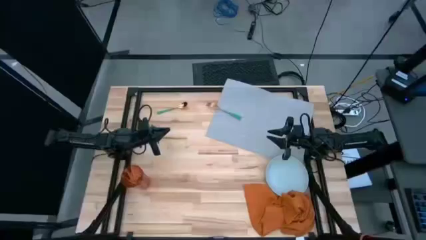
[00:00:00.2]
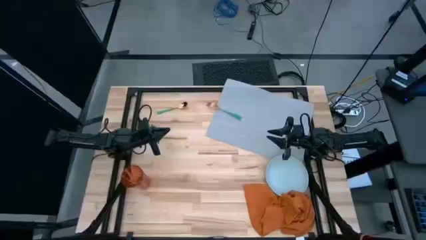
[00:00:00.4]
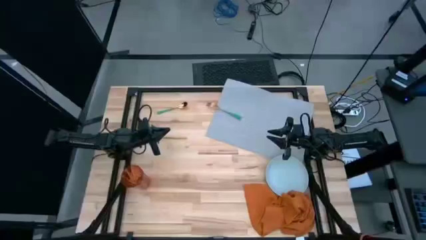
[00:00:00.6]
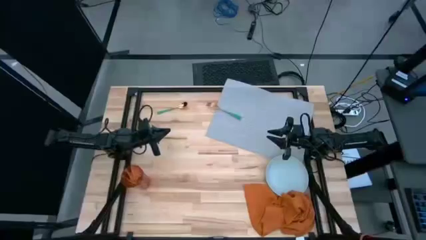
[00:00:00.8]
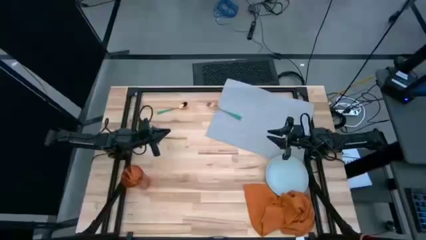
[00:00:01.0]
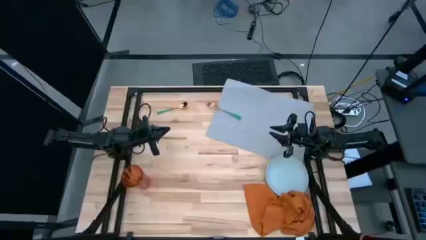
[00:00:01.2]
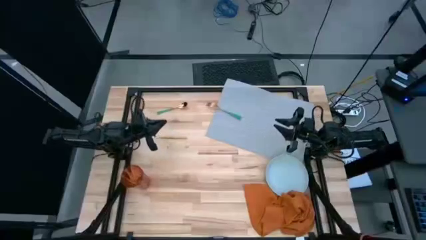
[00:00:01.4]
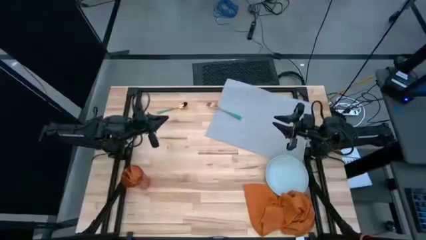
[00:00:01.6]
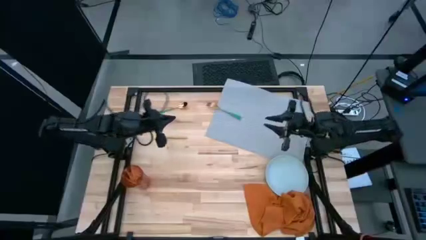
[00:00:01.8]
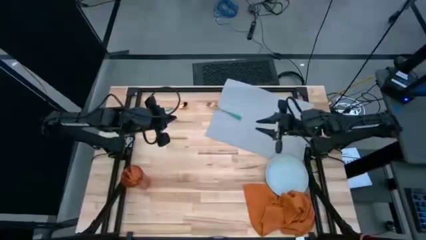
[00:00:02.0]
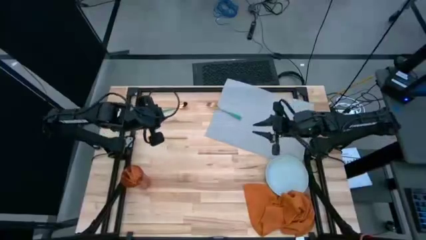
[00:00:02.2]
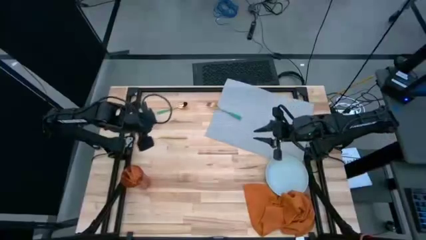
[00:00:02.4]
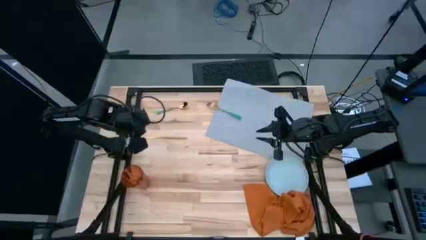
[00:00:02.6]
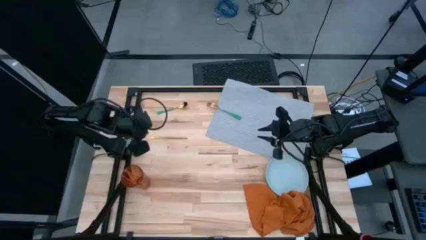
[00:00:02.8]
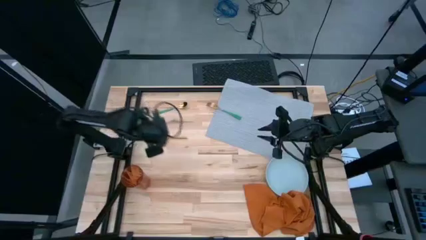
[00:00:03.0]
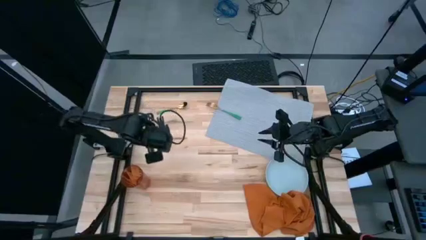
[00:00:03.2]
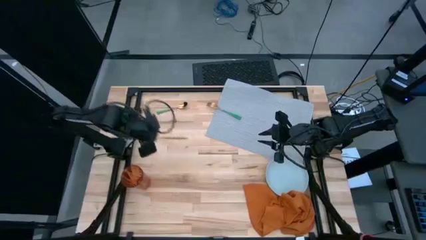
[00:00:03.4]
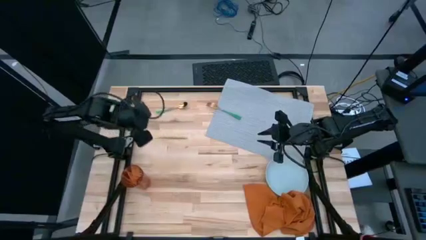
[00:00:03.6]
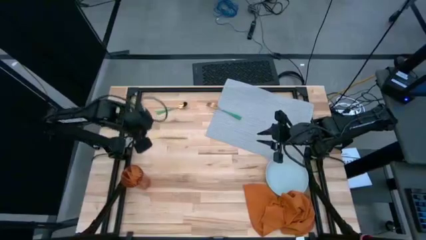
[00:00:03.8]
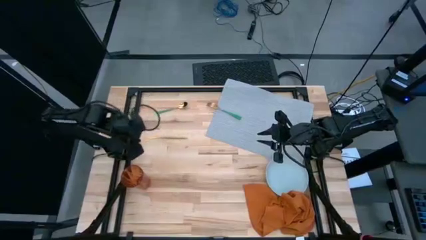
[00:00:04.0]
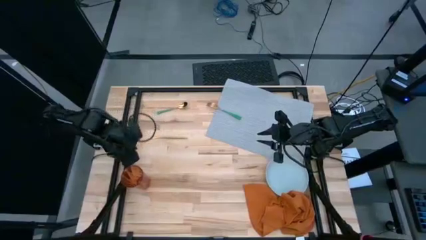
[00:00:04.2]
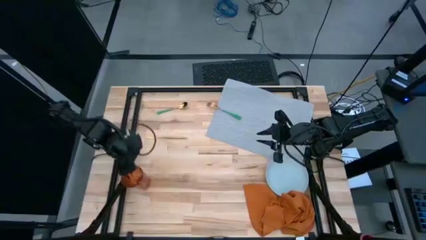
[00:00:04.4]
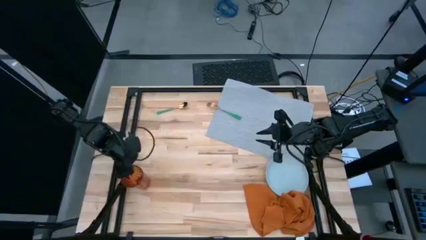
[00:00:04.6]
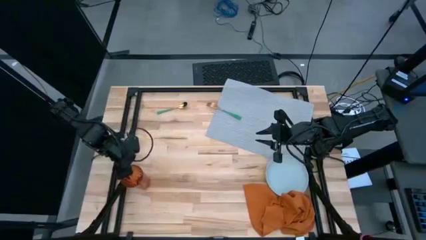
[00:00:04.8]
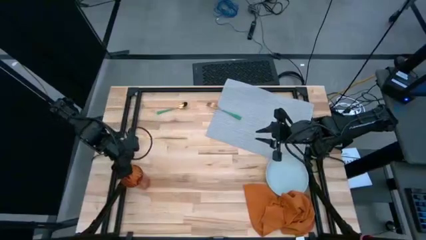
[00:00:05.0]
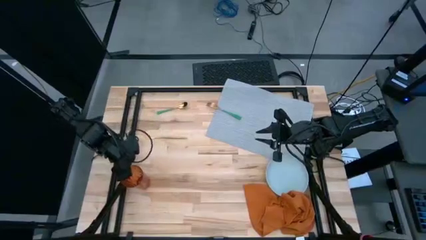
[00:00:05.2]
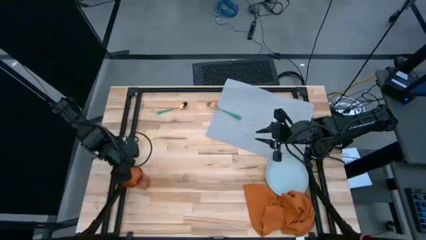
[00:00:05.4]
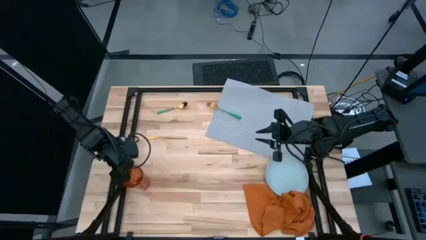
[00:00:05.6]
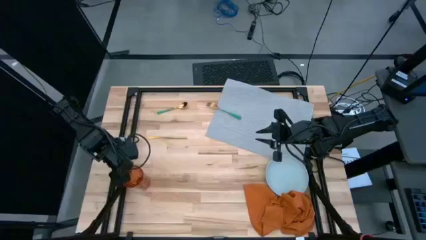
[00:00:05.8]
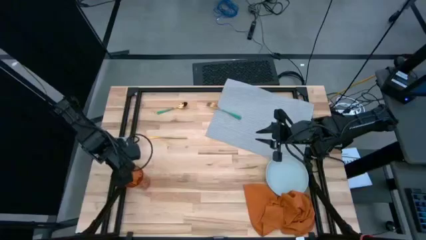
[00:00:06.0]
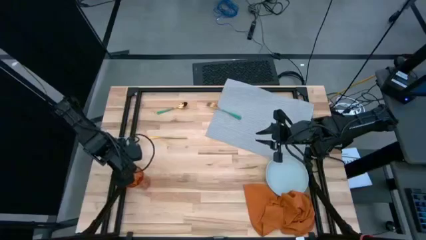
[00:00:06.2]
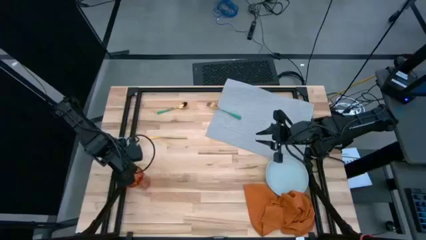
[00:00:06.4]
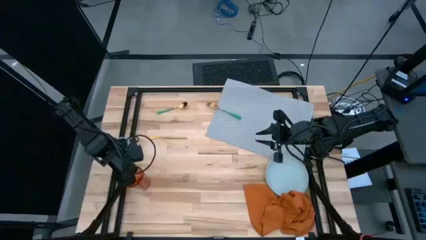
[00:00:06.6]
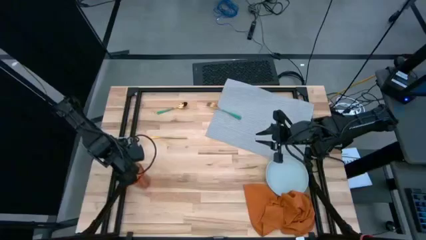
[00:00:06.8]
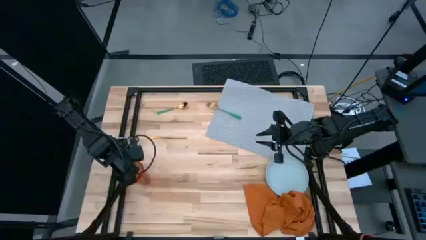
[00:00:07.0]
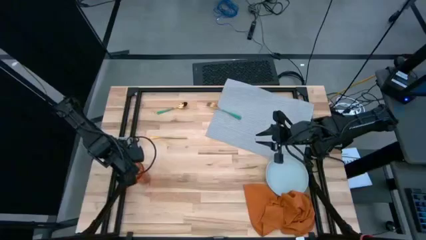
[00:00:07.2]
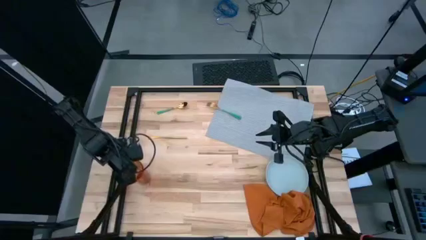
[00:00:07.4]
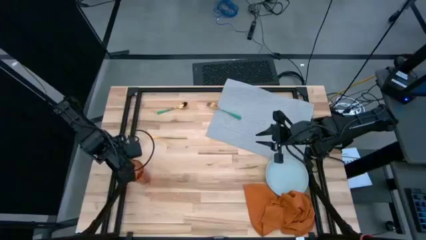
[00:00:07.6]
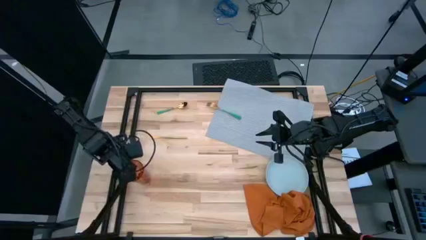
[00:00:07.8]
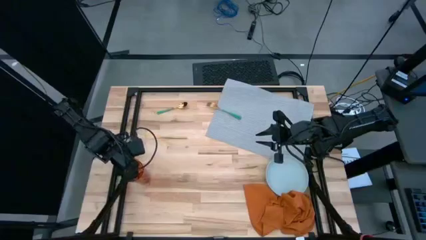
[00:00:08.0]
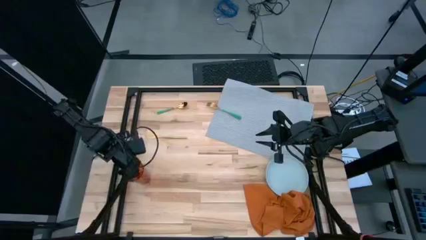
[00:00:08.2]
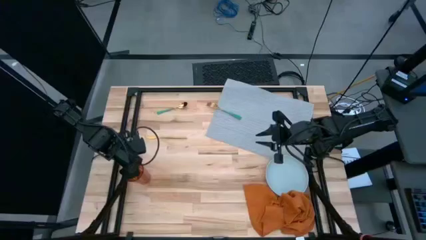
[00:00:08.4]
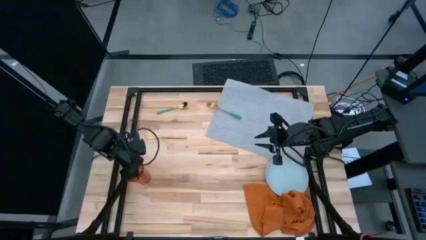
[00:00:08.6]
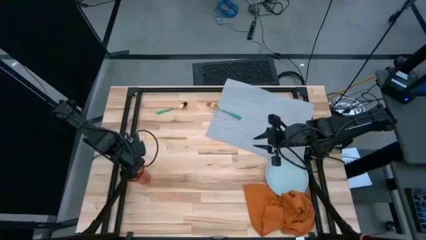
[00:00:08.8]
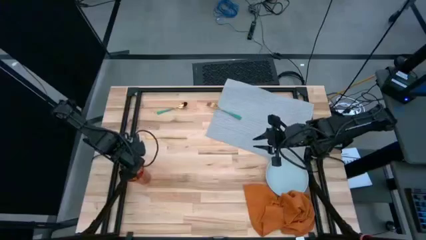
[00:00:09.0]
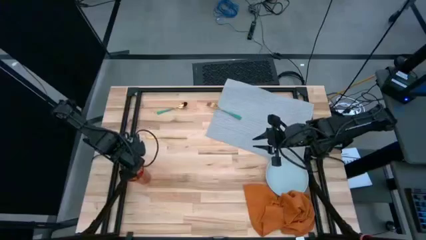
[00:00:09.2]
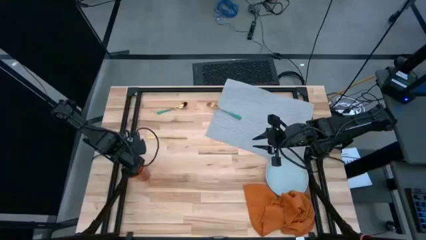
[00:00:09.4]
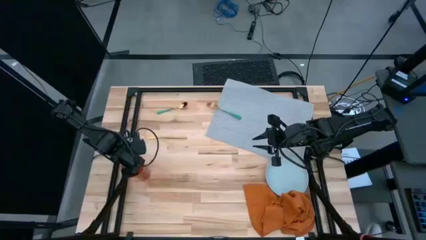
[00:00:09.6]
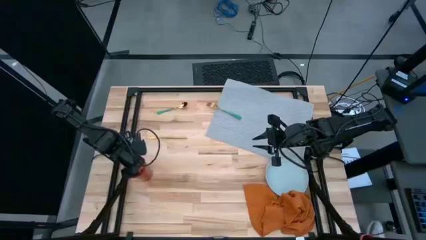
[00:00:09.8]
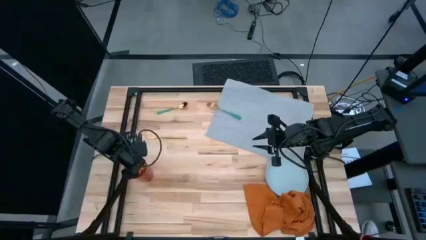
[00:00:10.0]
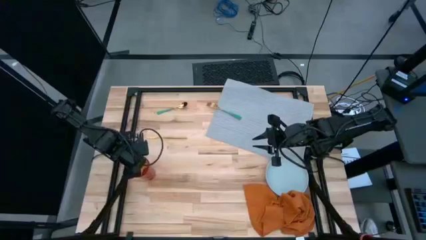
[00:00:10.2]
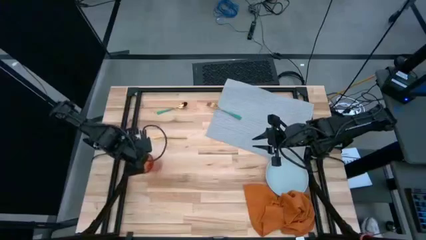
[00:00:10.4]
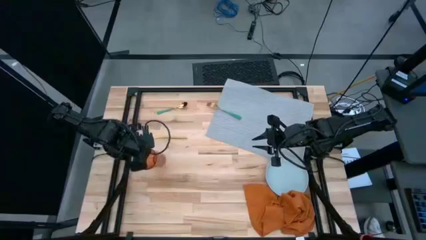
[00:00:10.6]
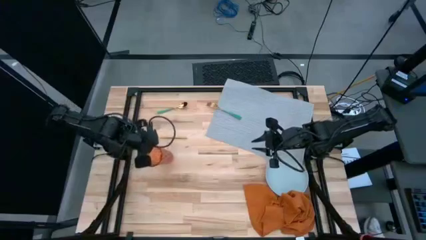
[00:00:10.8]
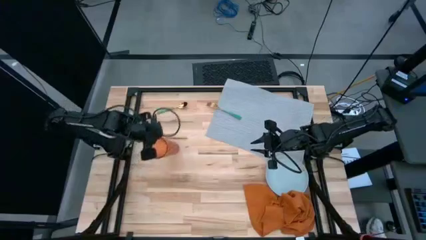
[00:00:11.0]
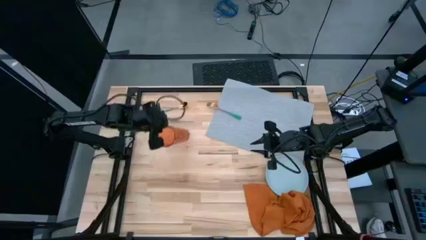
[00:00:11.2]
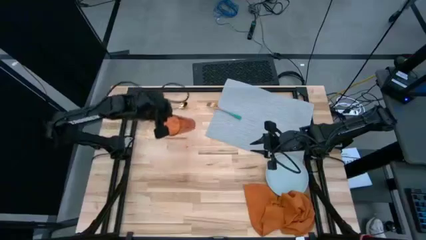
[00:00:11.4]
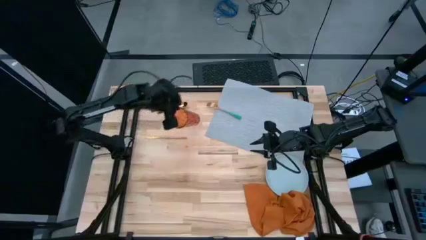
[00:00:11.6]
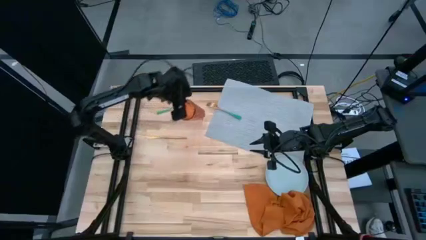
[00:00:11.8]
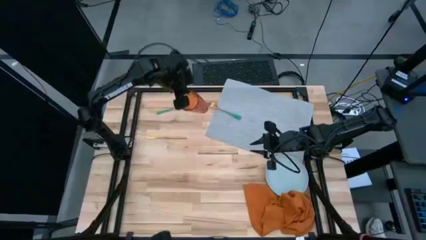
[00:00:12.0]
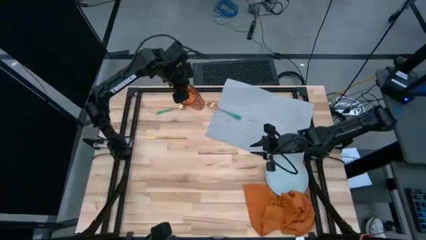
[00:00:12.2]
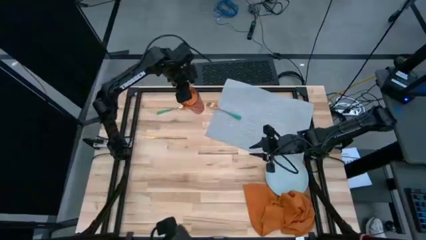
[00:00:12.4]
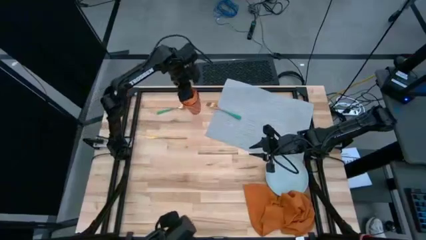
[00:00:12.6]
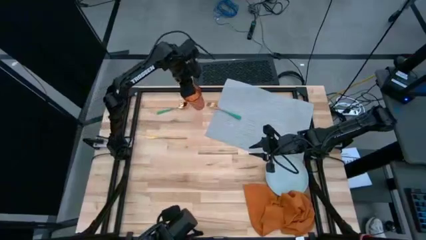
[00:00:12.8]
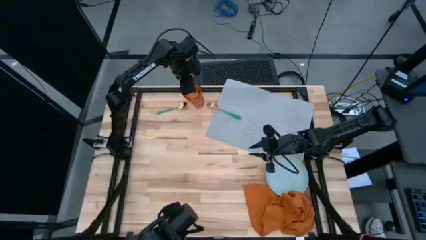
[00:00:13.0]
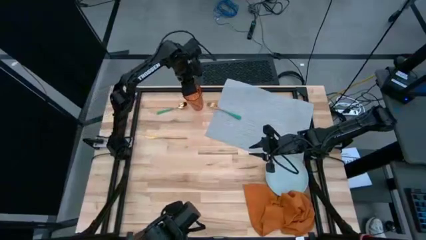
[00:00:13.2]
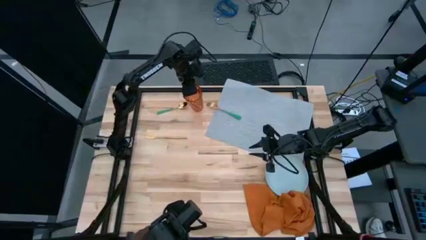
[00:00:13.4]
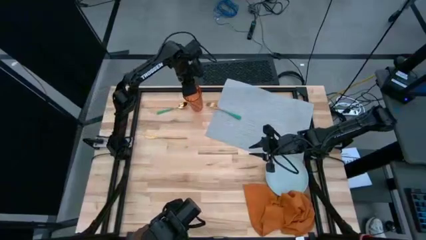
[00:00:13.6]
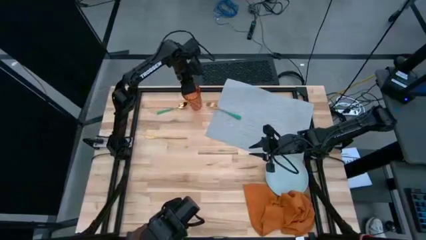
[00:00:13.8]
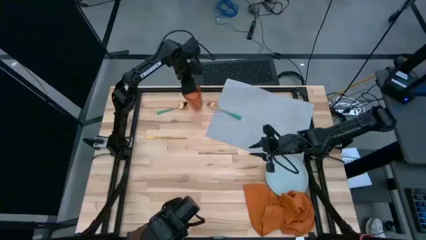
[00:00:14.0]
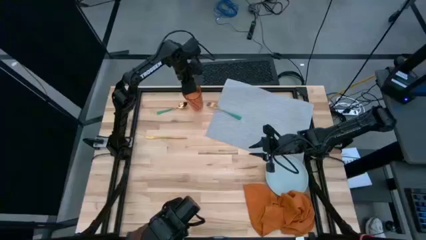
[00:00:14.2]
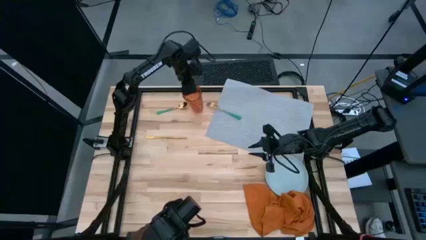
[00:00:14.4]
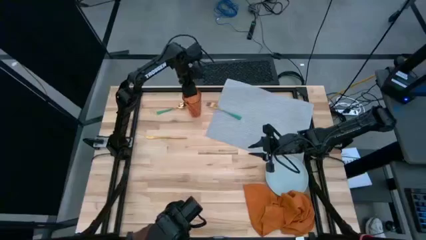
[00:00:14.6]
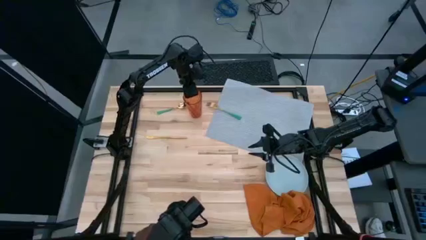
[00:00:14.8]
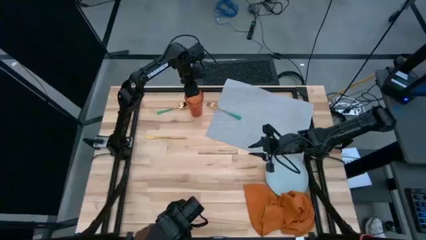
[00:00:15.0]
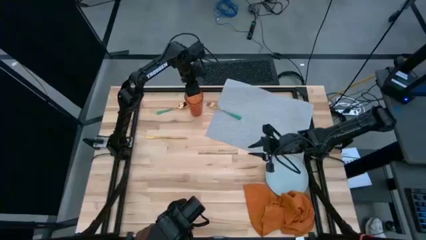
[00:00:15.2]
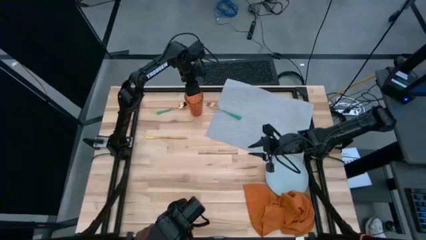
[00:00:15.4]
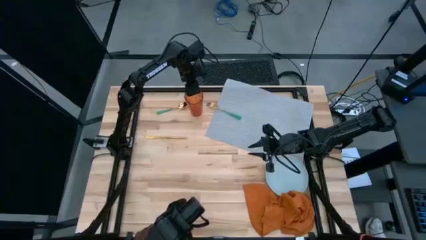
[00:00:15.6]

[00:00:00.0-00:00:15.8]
Task: Set table place
Move the orange cup to the top center of the table
